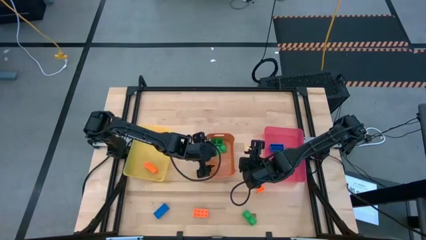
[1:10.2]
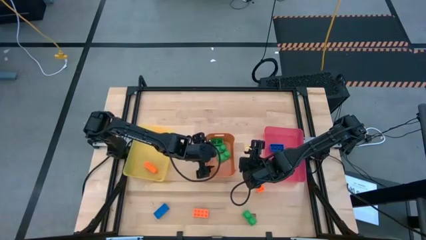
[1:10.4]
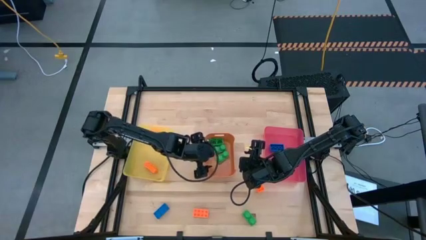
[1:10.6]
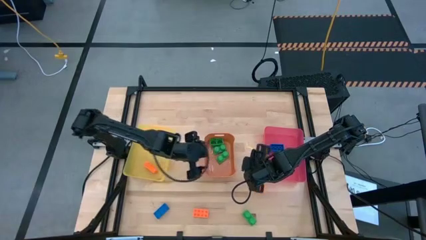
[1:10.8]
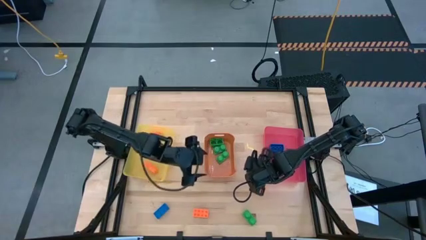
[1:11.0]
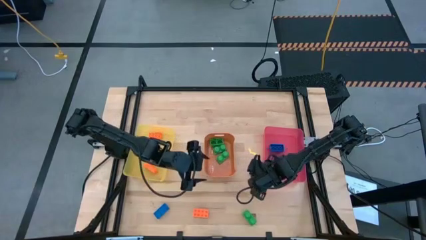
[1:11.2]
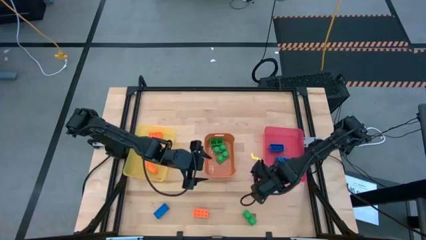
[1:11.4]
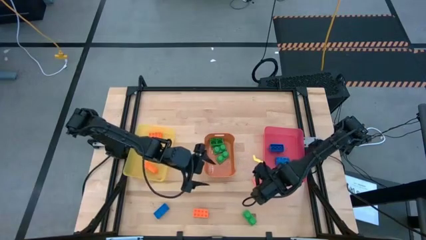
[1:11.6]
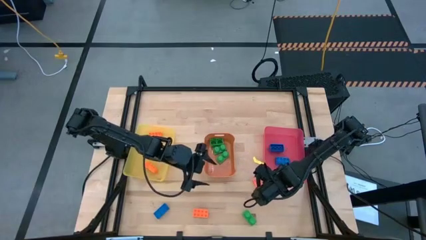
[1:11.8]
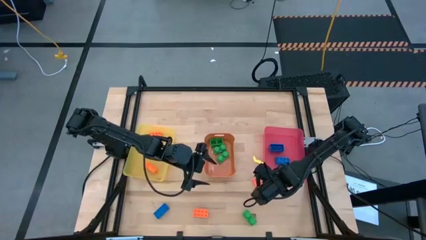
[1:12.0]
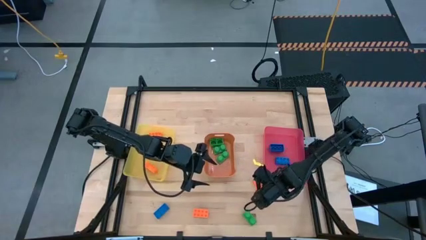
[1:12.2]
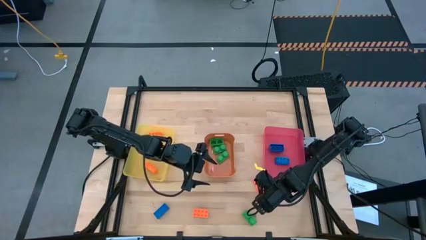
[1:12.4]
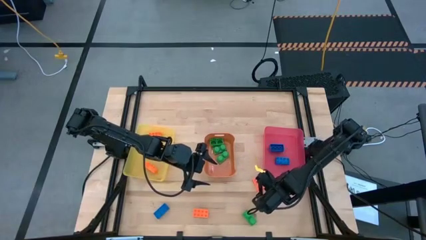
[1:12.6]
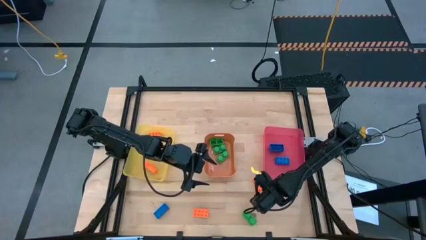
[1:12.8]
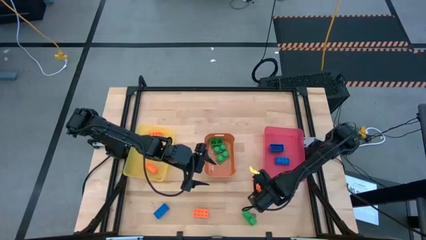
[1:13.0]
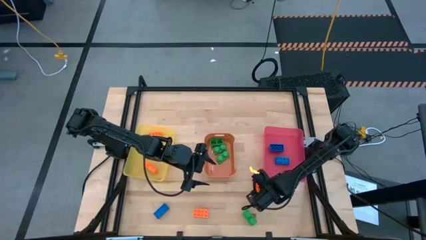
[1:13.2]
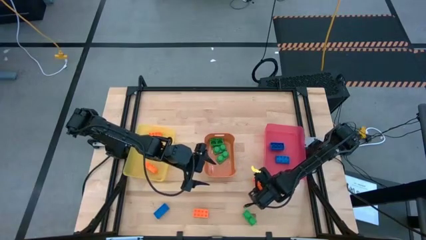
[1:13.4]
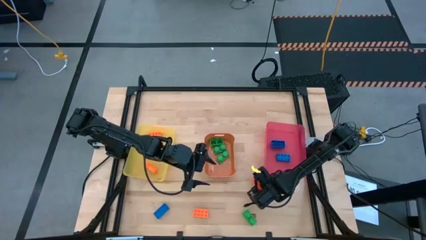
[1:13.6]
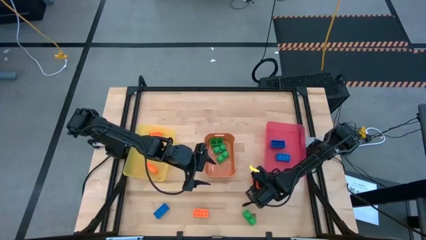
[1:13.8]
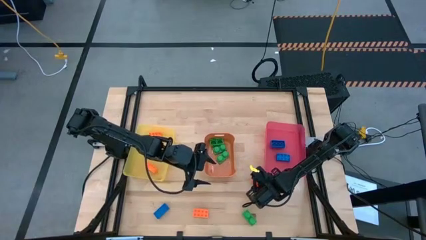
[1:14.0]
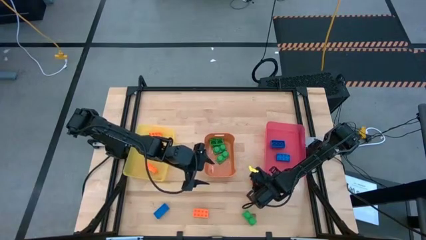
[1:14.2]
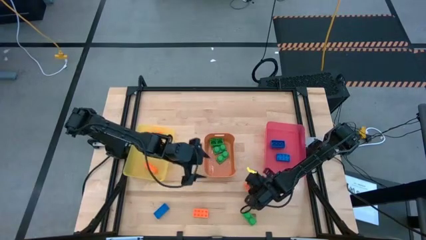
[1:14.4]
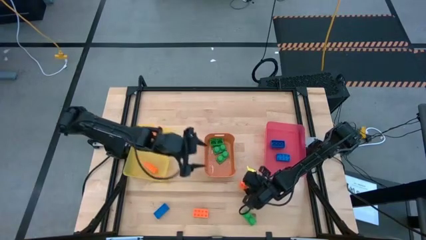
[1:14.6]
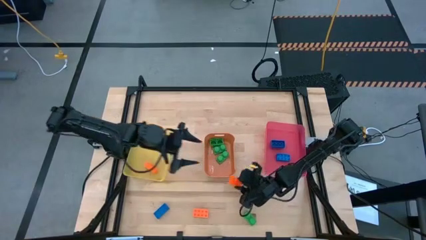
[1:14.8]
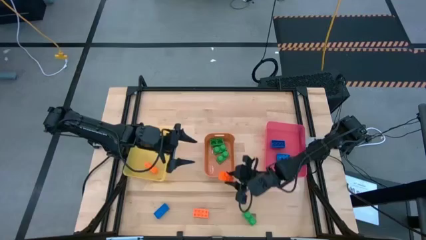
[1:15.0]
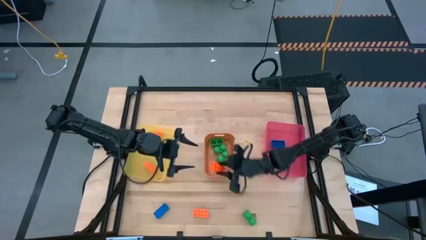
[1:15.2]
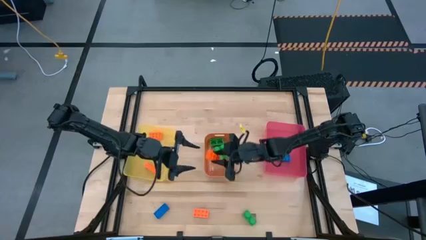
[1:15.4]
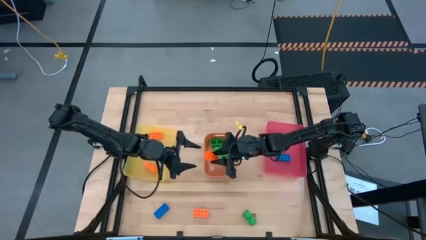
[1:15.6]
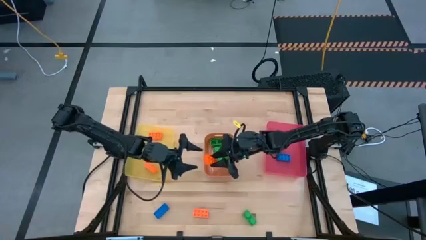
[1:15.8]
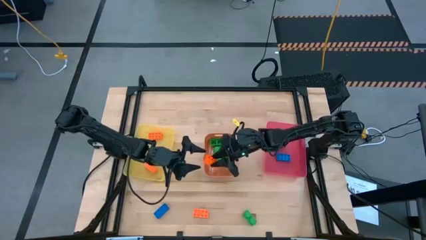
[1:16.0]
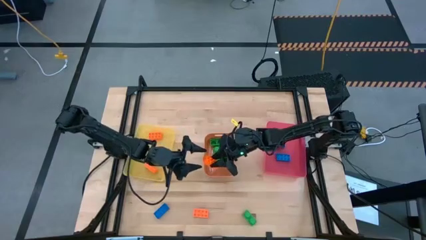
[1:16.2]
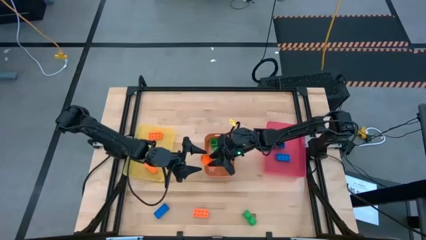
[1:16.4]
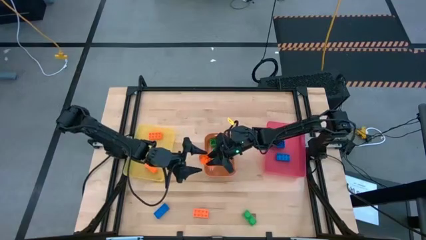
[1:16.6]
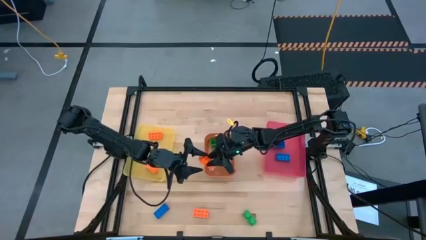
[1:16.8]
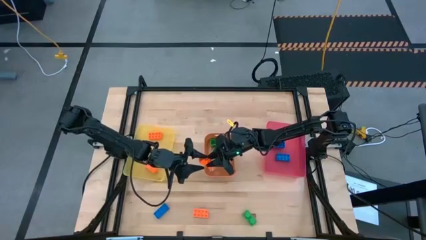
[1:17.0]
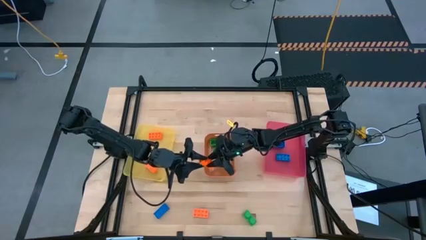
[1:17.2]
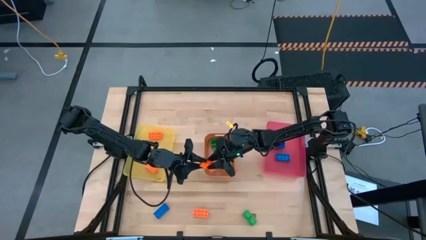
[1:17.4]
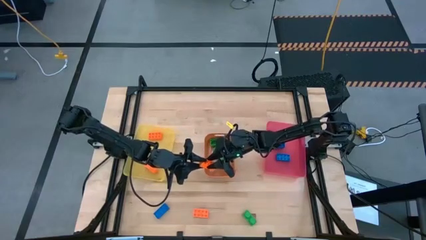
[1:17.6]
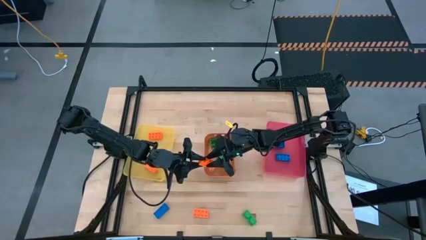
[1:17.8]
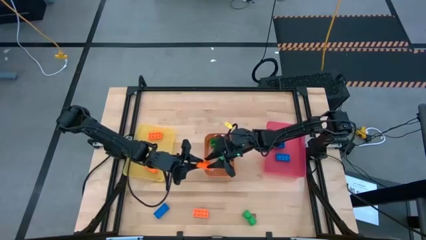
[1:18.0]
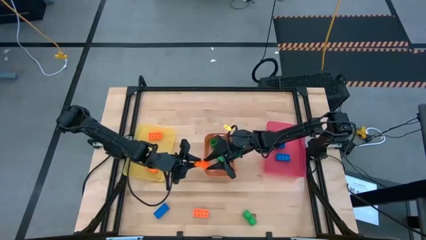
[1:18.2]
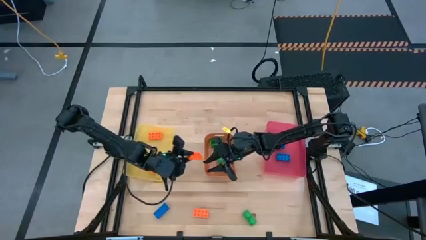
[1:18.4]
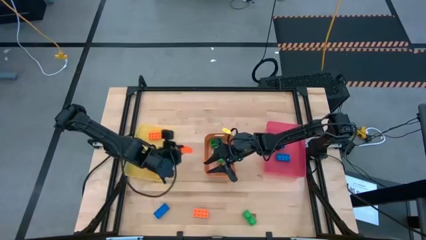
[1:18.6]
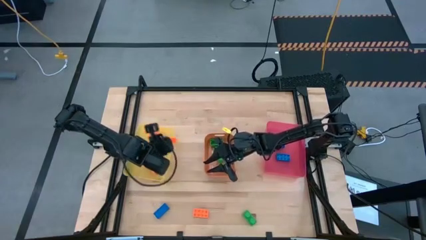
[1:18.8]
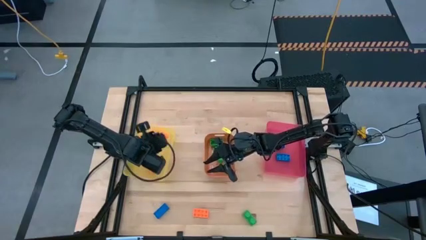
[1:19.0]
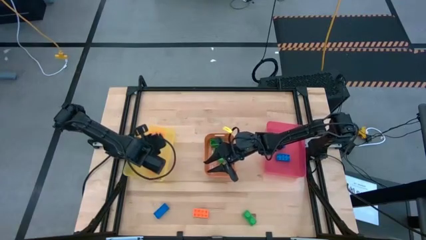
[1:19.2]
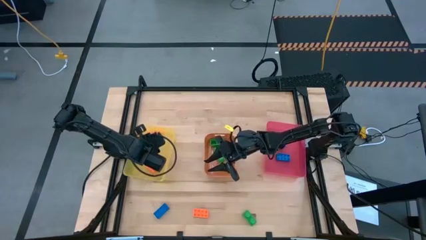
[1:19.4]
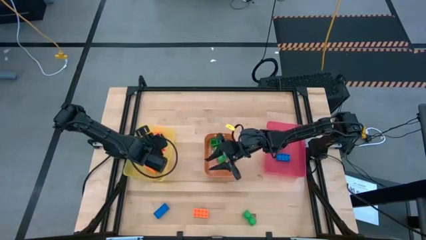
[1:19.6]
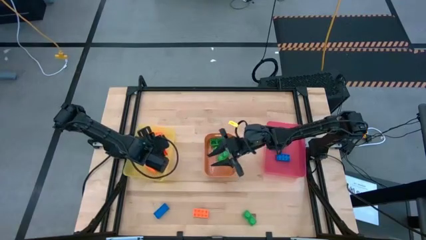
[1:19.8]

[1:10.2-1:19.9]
Task: Sort & place blocks by color
Put the orange game piece into the yellow bin

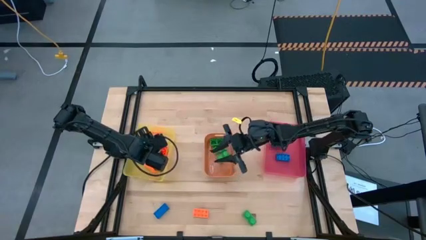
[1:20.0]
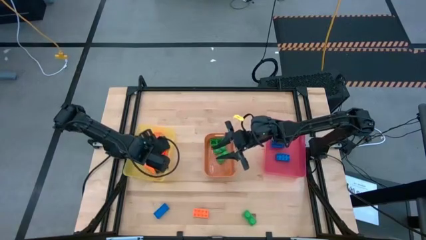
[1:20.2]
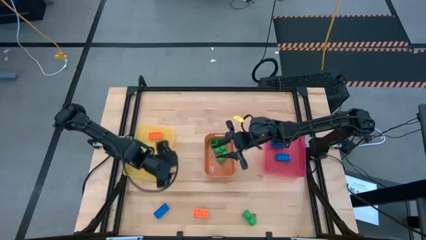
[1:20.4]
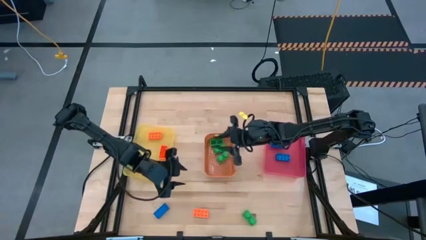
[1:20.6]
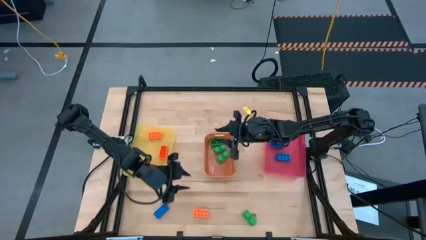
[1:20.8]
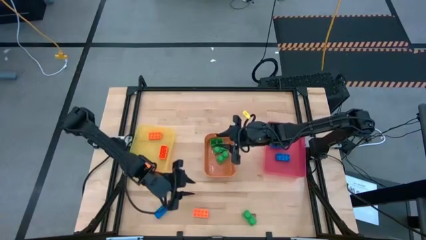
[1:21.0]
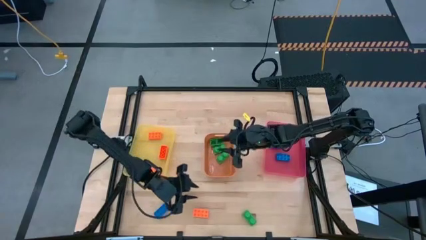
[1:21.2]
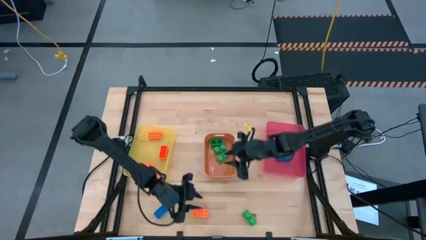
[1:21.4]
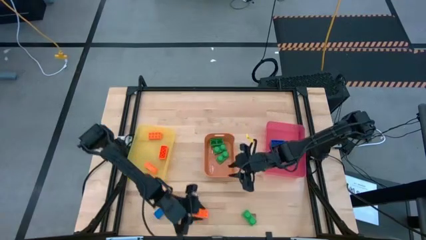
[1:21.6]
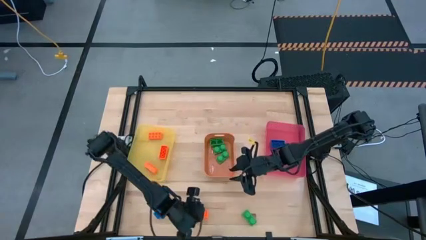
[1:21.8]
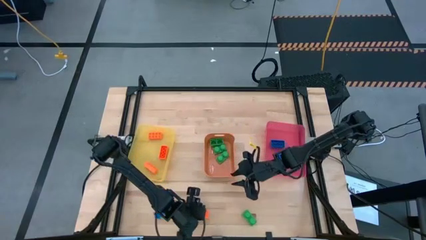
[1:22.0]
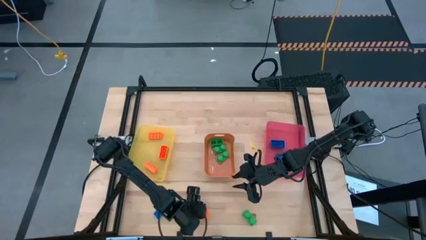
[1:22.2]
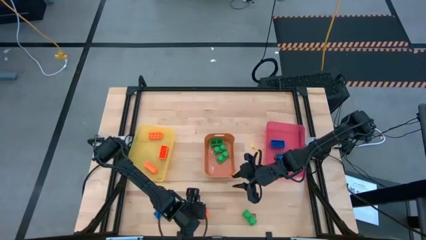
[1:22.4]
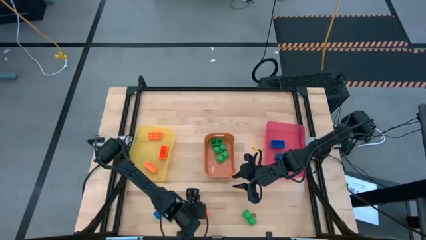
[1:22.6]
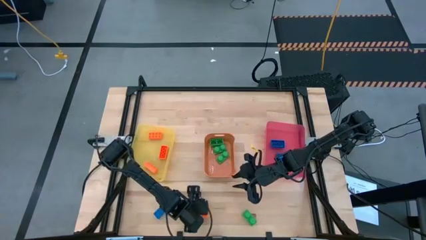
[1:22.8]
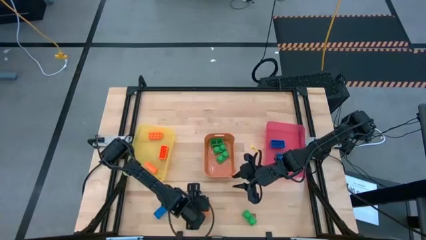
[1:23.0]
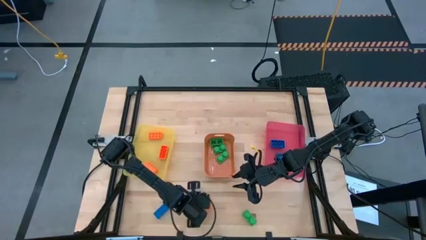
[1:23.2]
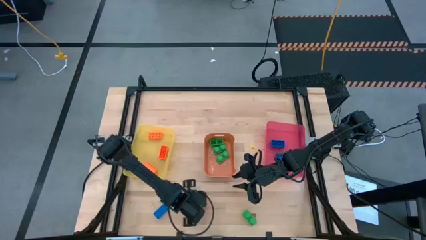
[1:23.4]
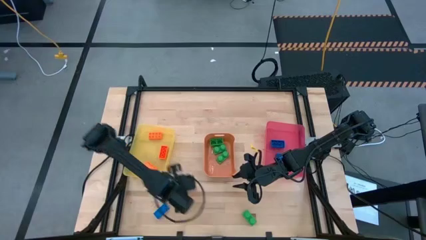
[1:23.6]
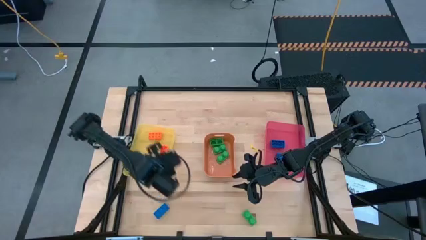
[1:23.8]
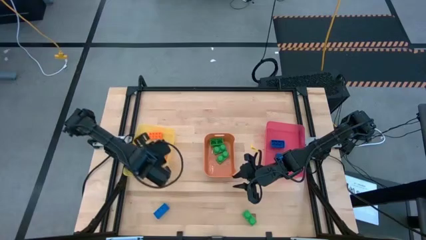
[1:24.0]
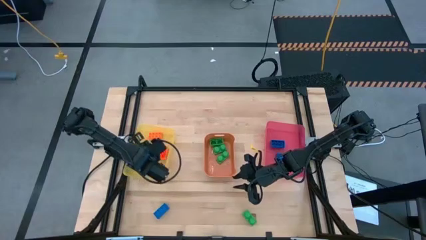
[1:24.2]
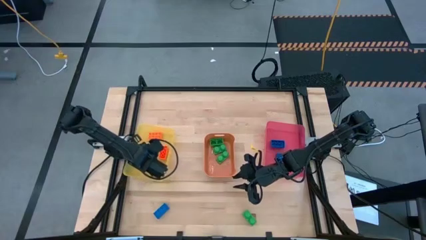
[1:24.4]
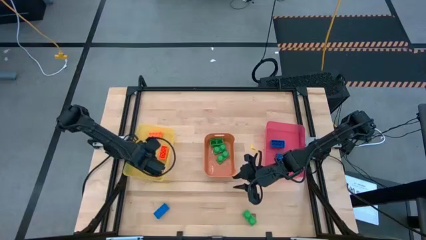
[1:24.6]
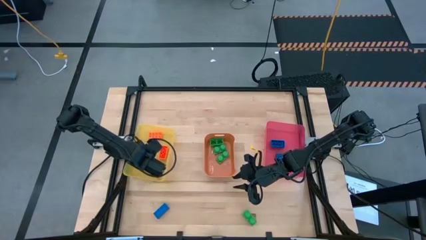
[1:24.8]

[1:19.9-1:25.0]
Put the orange game piece into the yellow bin
